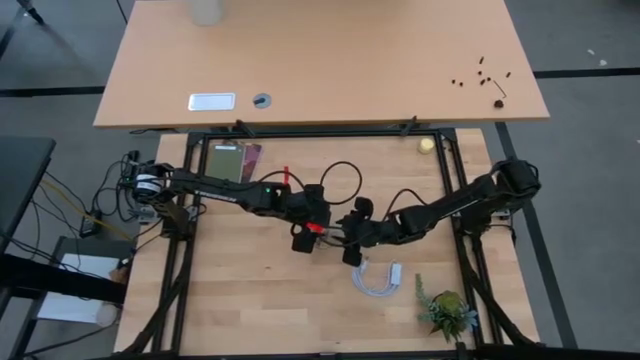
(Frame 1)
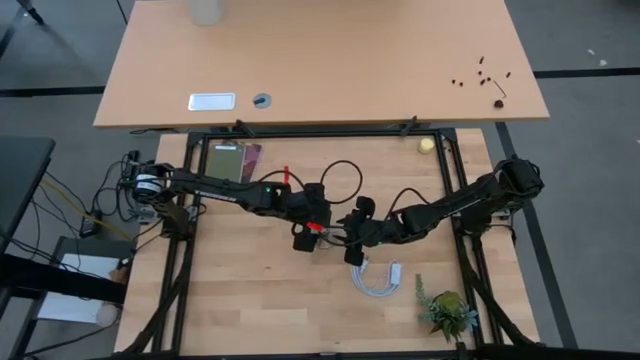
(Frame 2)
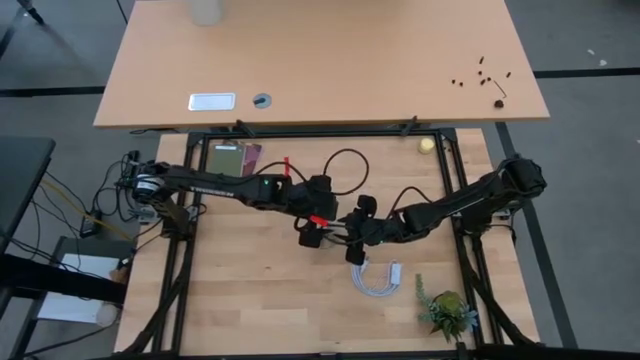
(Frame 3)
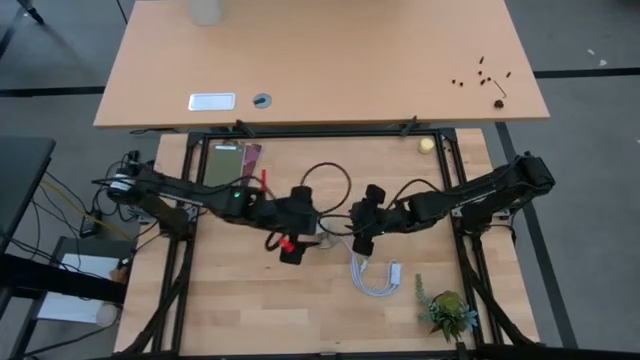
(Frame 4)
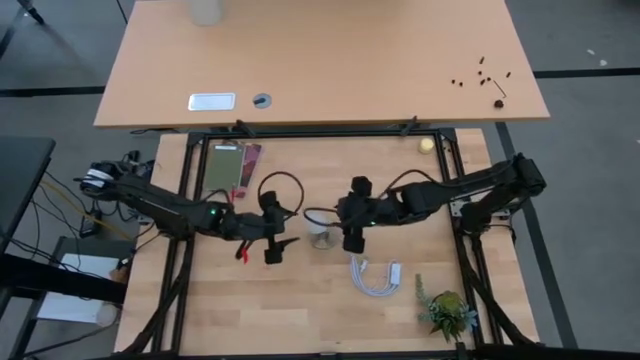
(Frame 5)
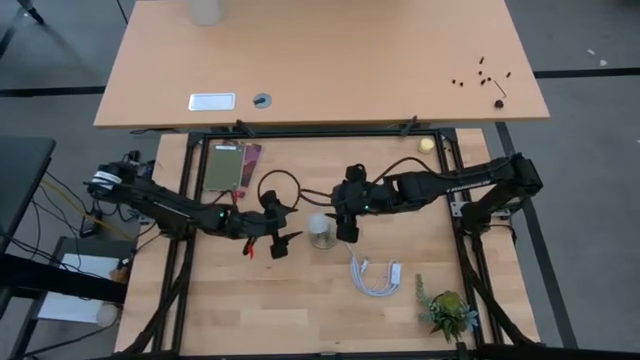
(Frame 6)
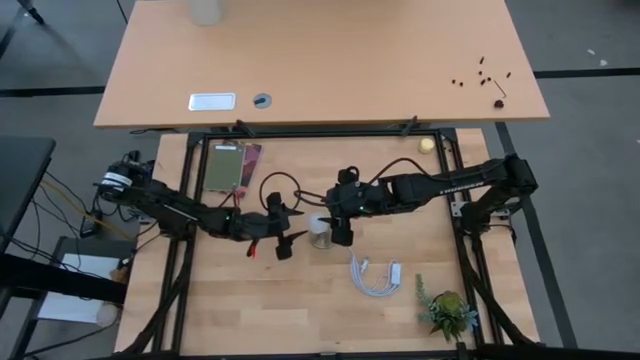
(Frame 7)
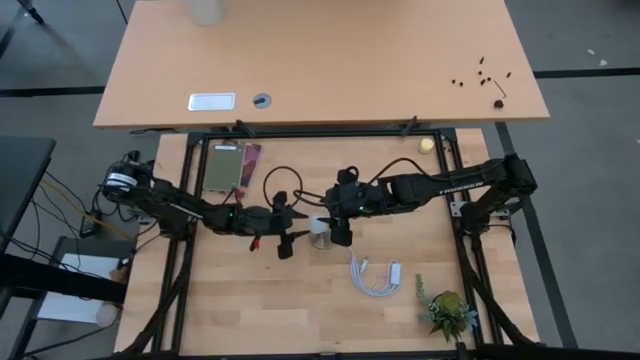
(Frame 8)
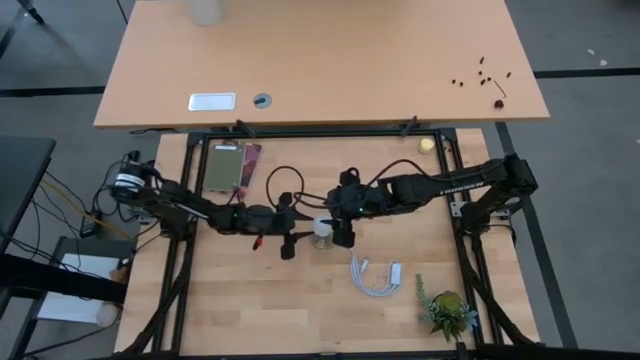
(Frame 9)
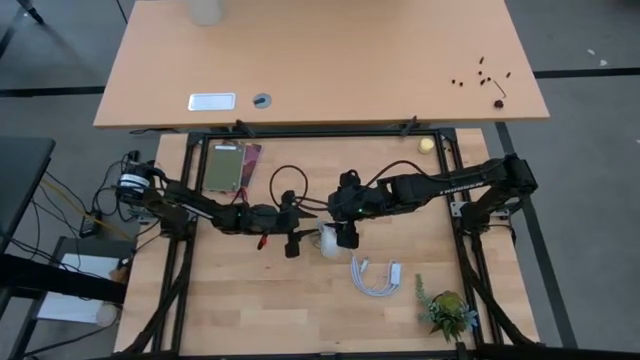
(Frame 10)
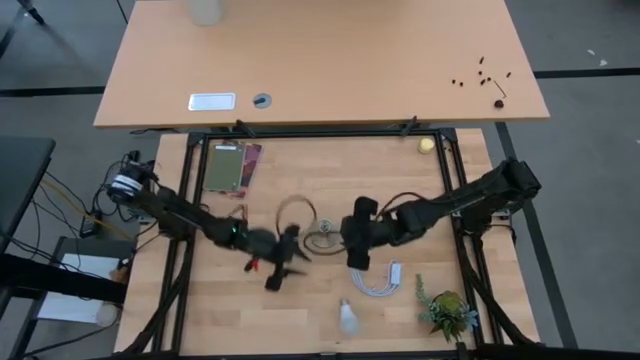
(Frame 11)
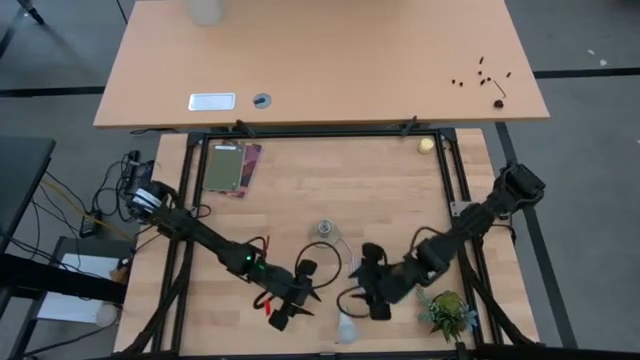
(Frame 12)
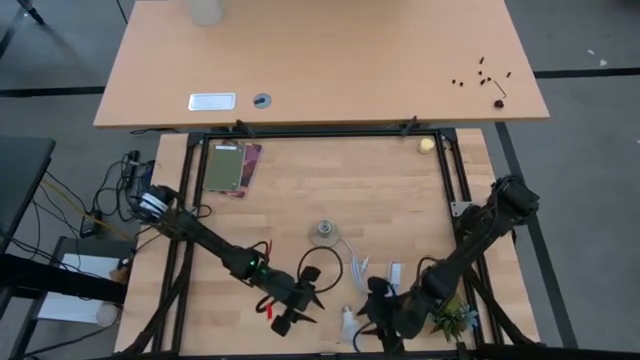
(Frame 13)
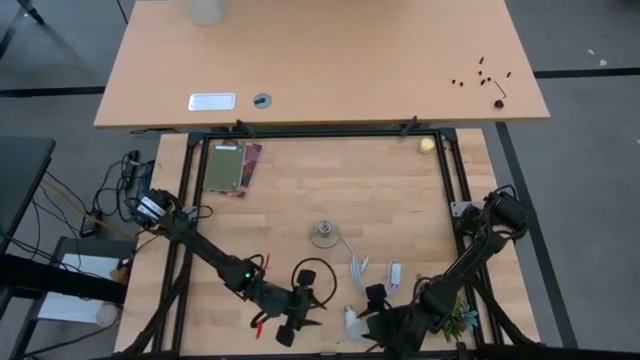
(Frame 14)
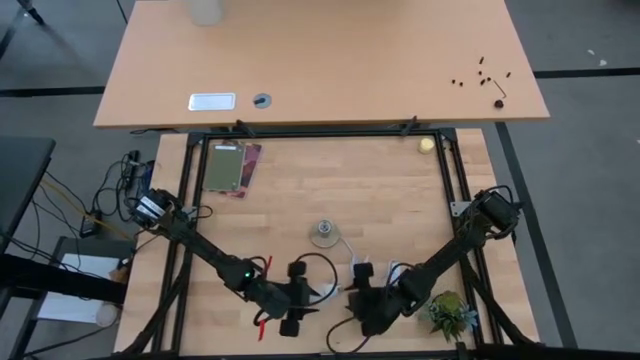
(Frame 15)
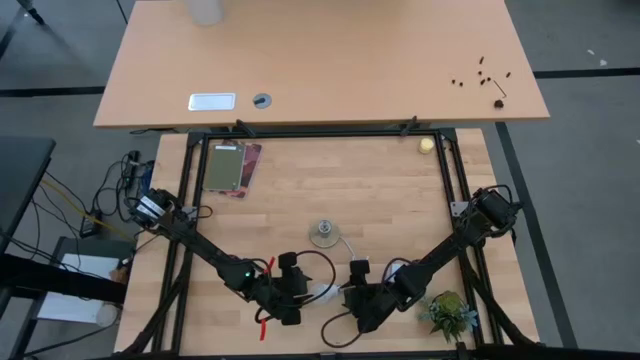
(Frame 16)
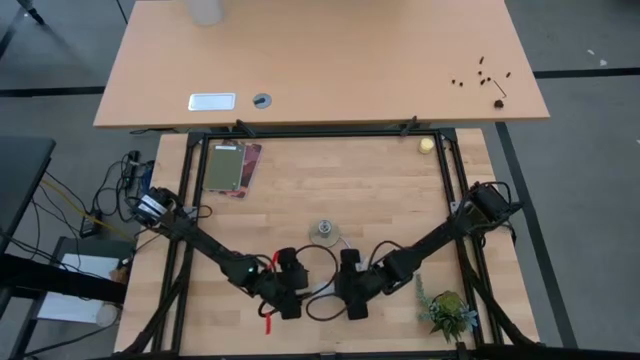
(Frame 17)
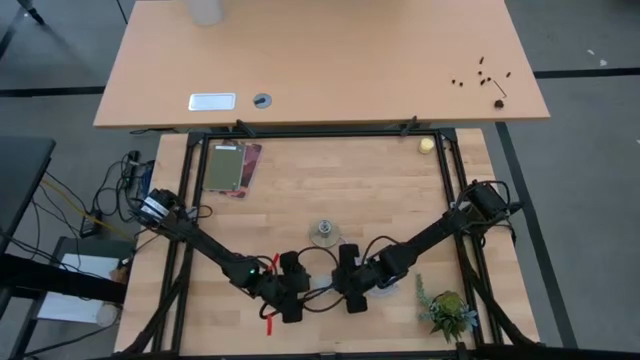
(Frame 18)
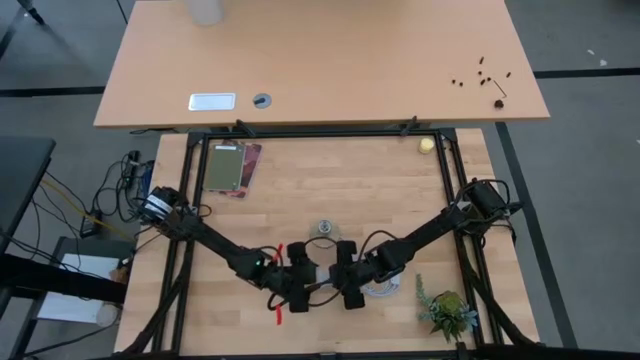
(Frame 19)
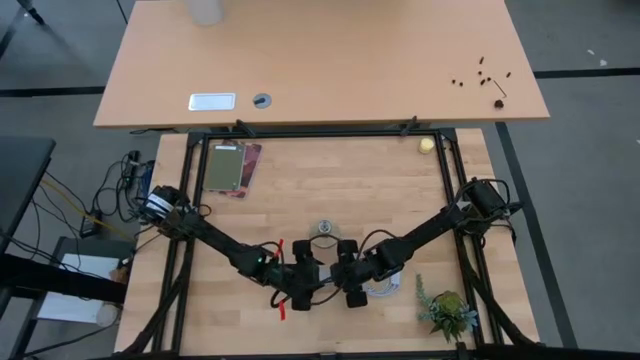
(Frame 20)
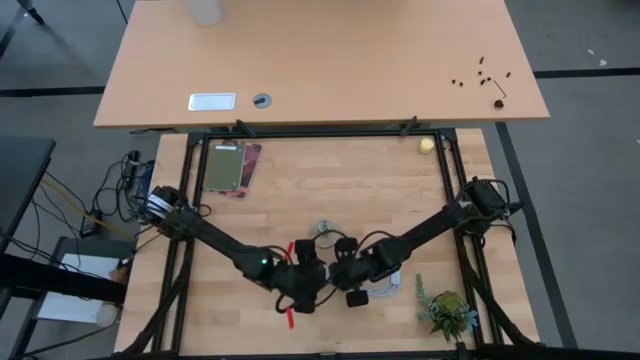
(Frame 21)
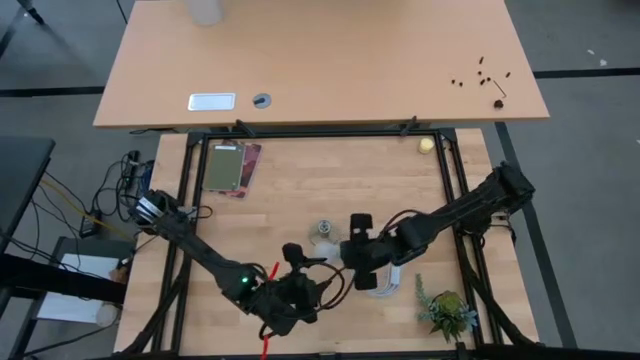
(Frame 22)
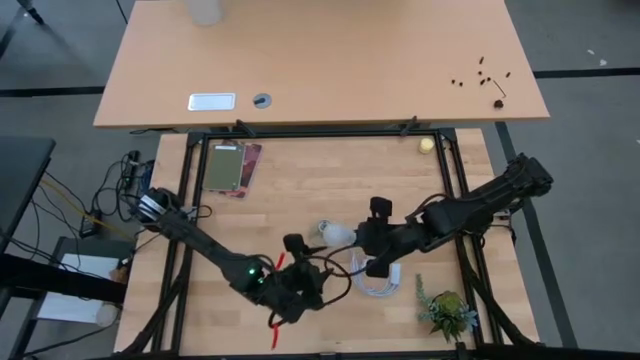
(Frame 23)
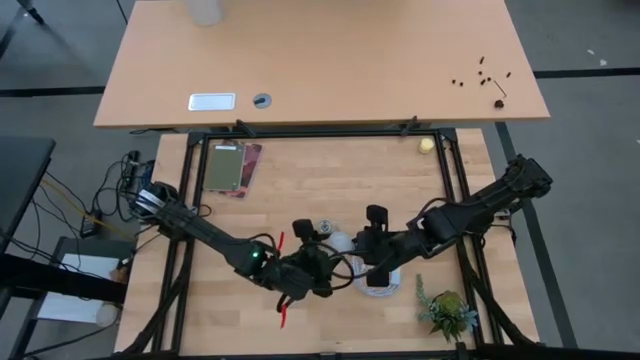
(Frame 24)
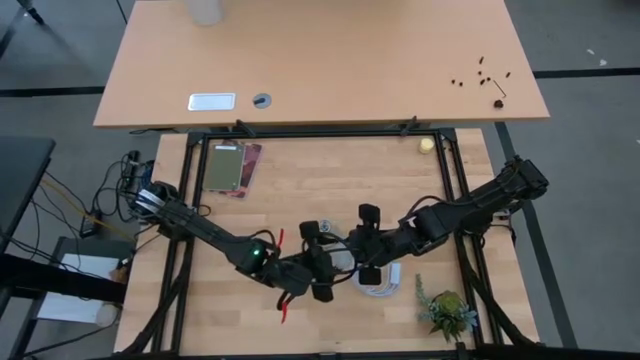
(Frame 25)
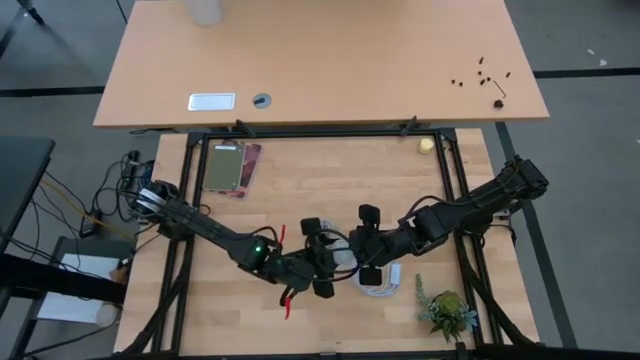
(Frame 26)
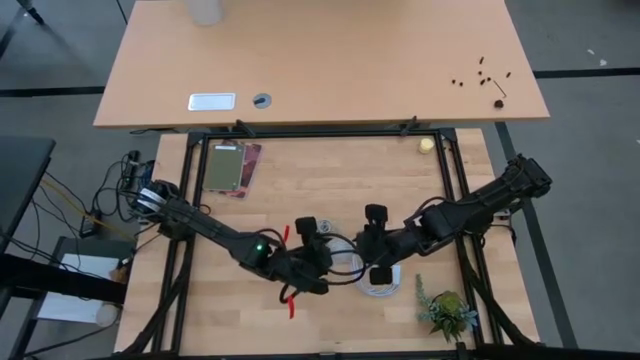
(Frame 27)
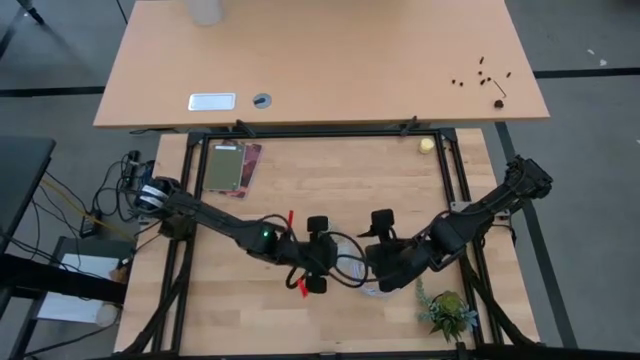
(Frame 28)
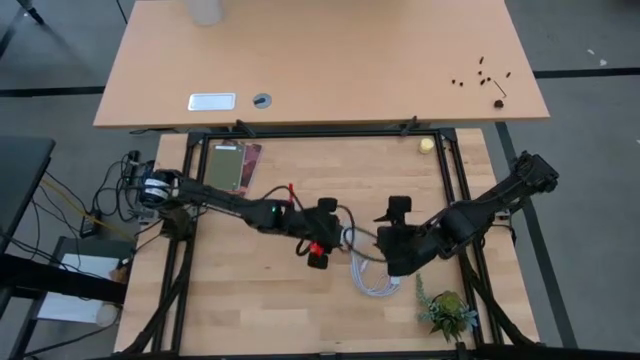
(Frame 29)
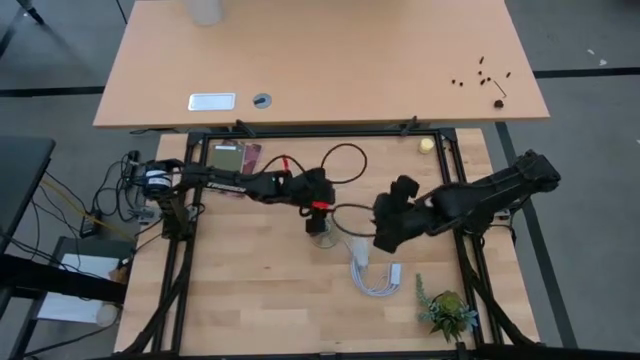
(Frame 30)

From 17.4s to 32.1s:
Task: Screw lightbulb
Insert the white lightbulb into the desk lamp

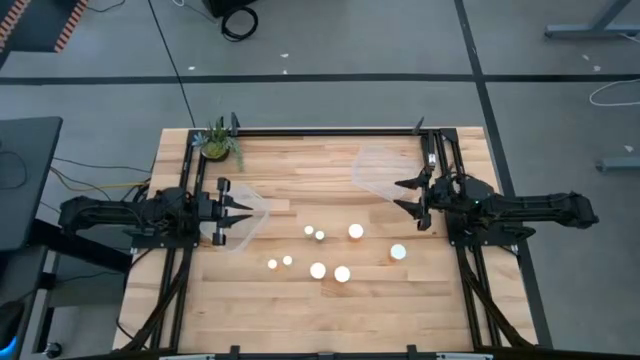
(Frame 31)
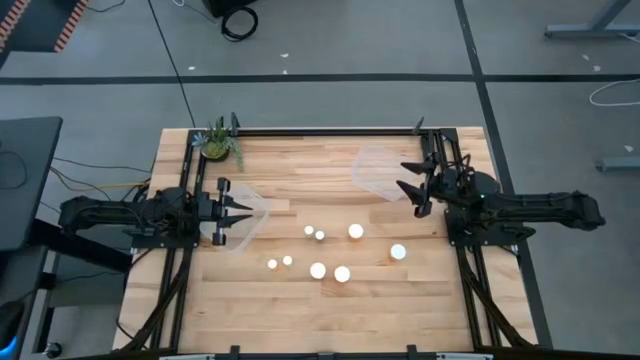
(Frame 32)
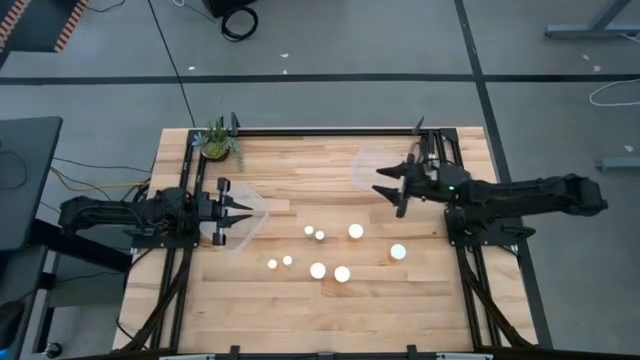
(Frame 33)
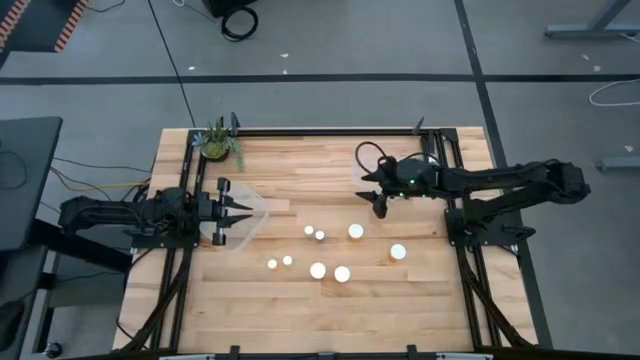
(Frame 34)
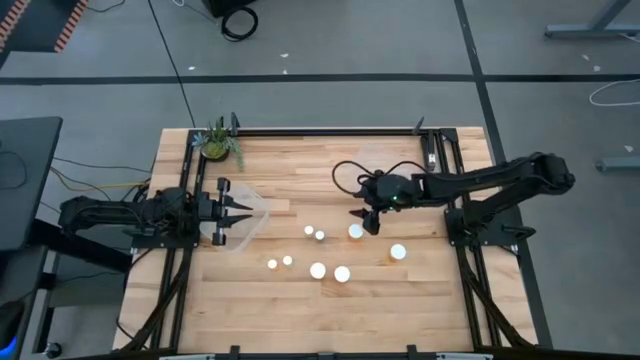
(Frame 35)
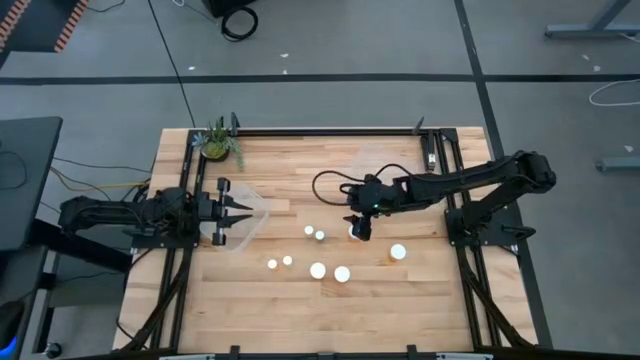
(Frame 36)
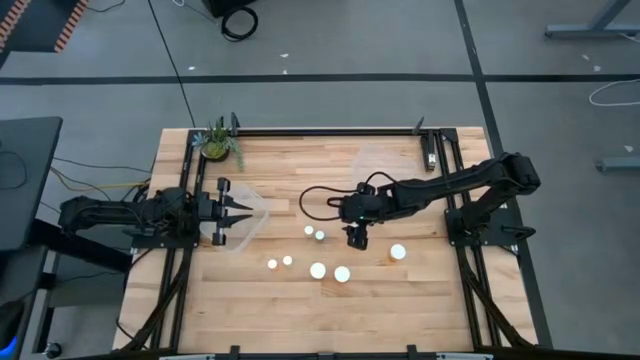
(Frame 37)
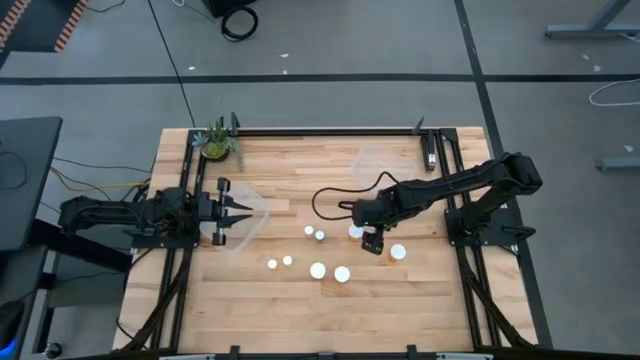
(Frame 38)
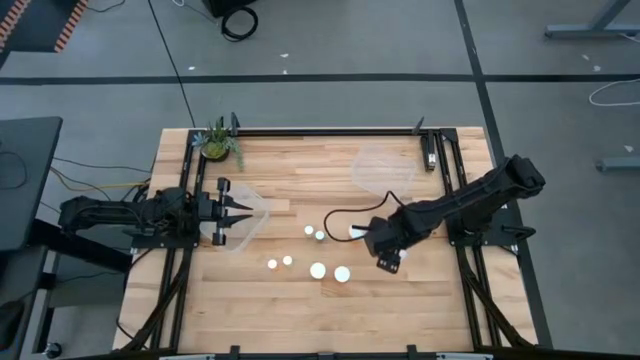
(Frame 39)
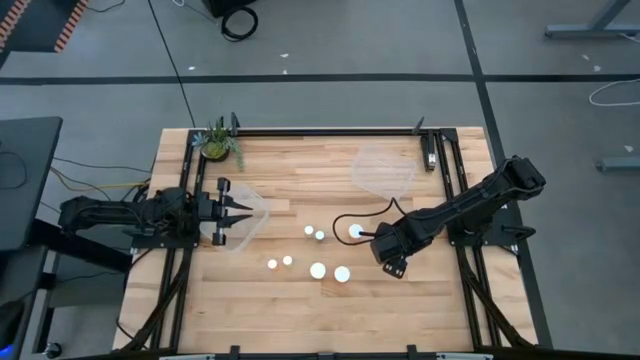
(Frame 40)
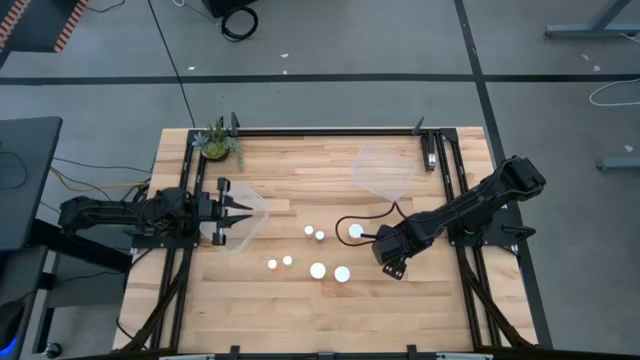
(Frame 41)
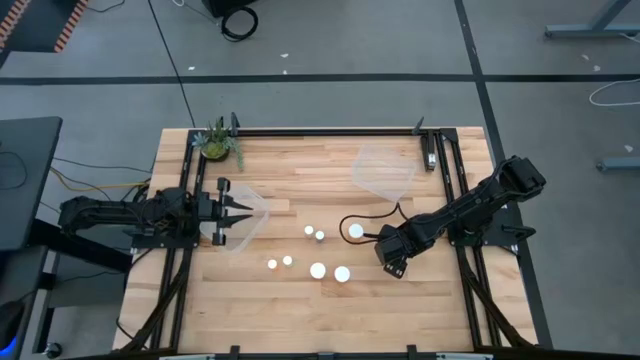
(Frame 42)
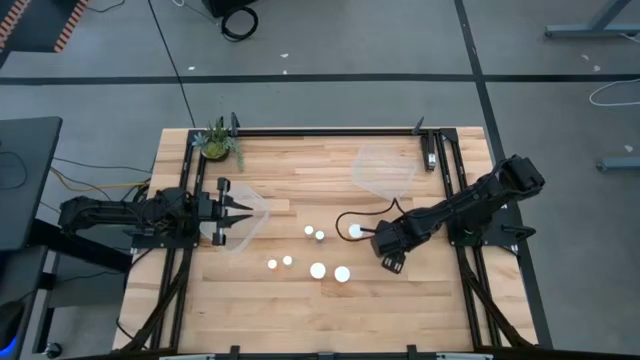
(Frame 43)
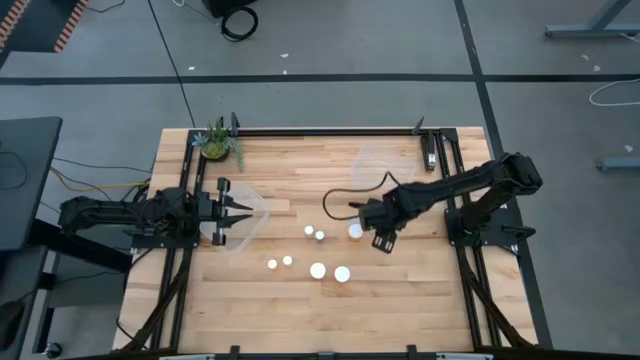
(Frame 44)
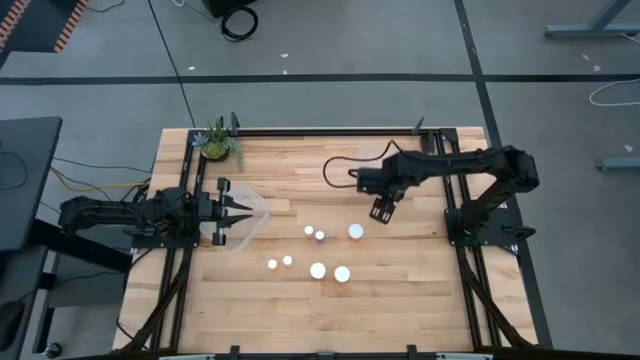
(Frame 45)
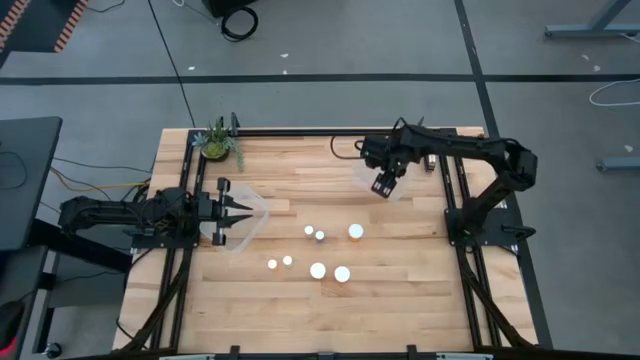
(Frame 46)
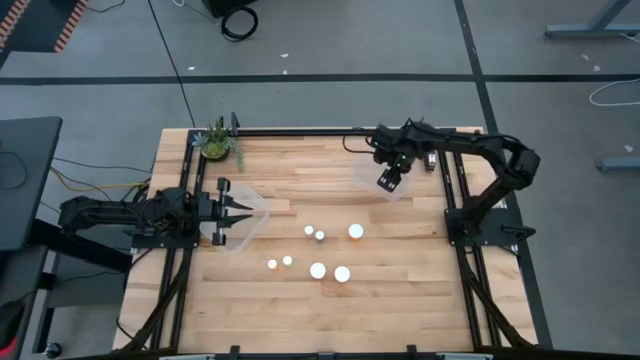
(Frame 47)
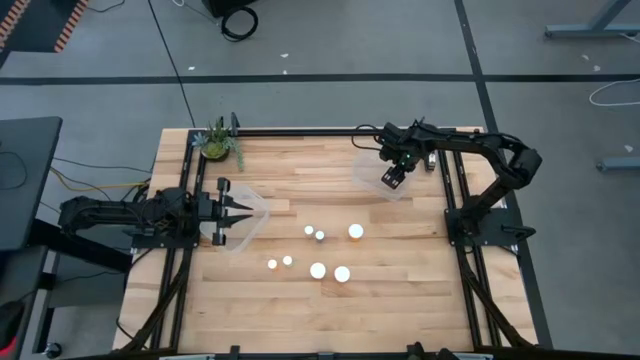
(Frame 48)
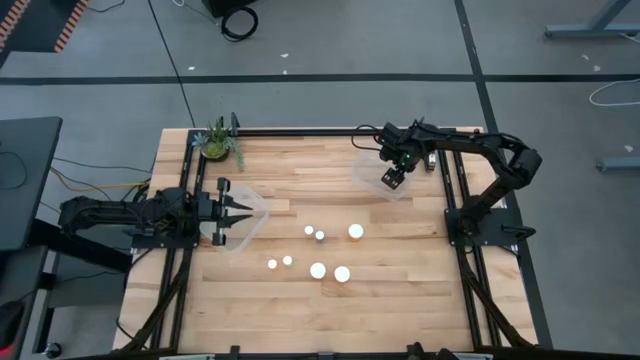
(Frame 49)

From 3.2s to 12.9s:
Task: Pick and place medicine bottles into bin by pill shape (circle, oval)
Put the large orange pill bottle into the right transparent bin
